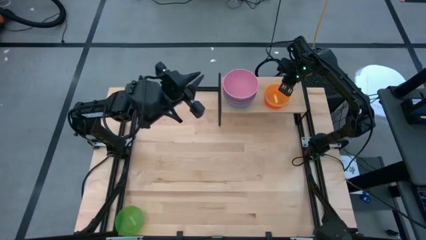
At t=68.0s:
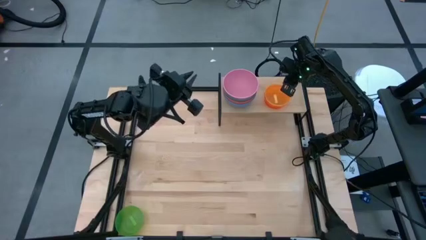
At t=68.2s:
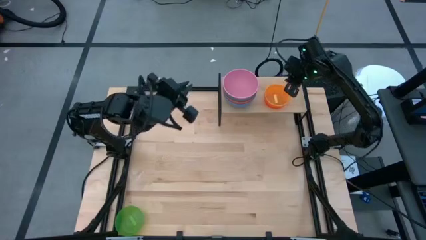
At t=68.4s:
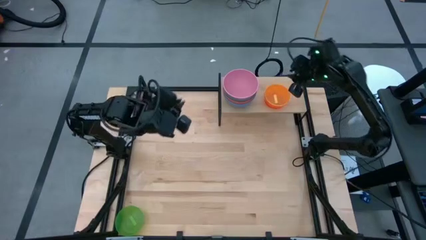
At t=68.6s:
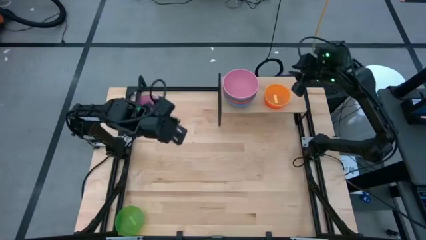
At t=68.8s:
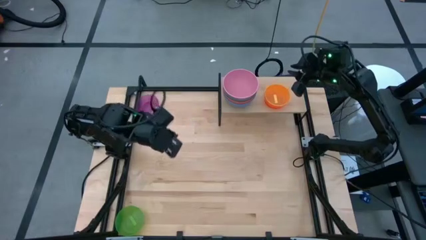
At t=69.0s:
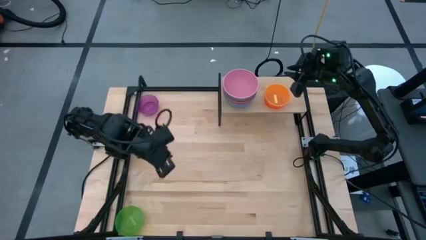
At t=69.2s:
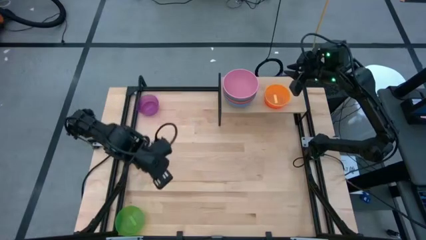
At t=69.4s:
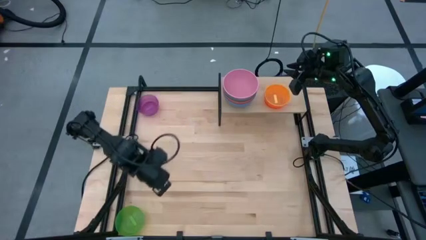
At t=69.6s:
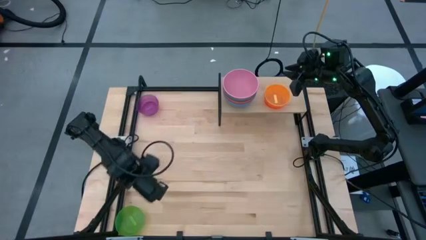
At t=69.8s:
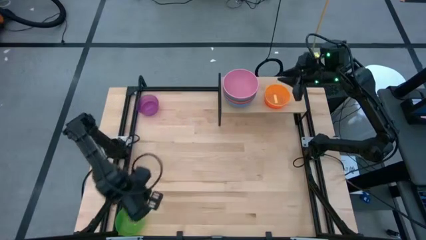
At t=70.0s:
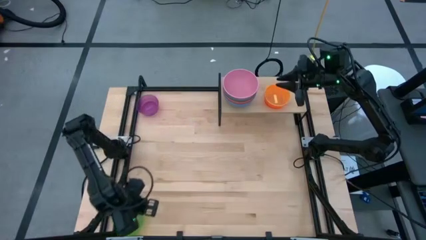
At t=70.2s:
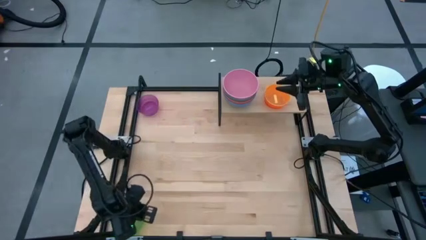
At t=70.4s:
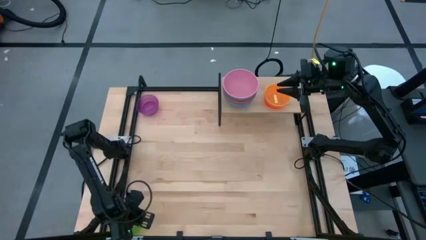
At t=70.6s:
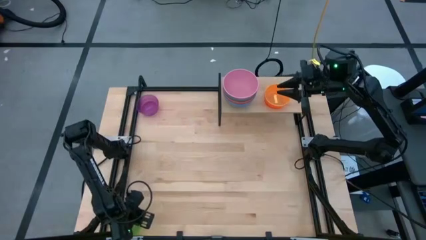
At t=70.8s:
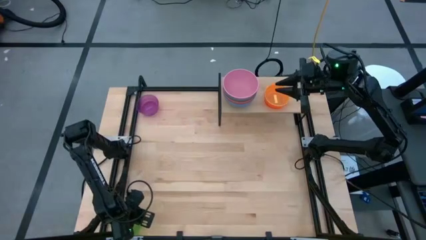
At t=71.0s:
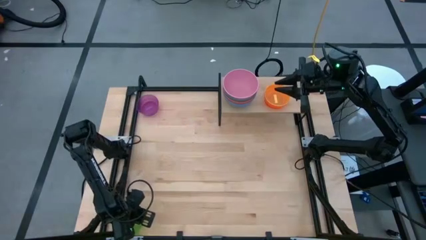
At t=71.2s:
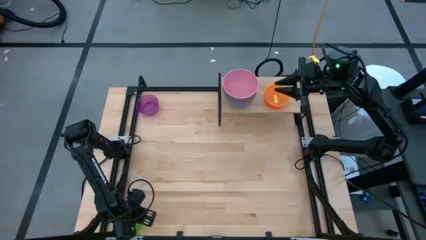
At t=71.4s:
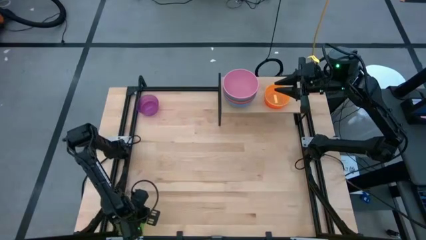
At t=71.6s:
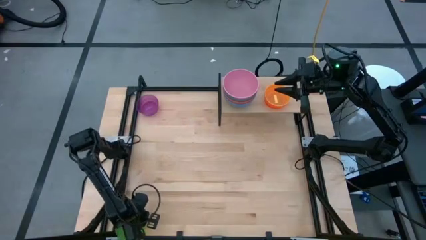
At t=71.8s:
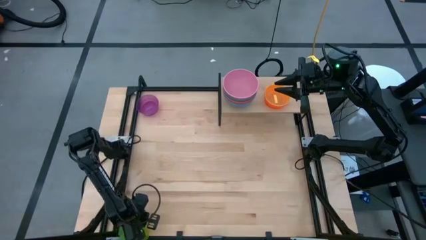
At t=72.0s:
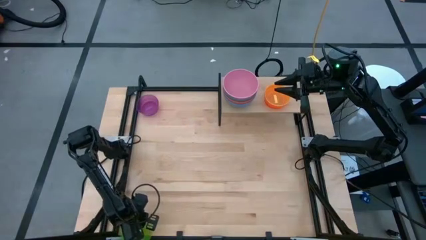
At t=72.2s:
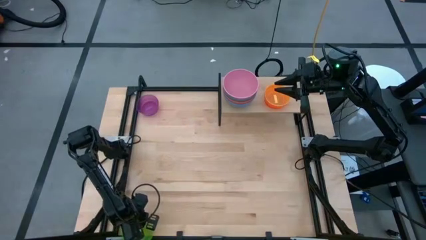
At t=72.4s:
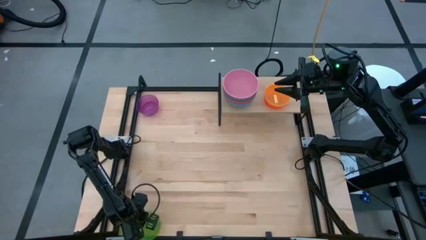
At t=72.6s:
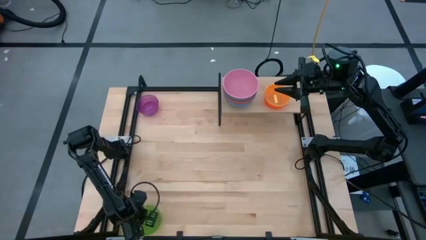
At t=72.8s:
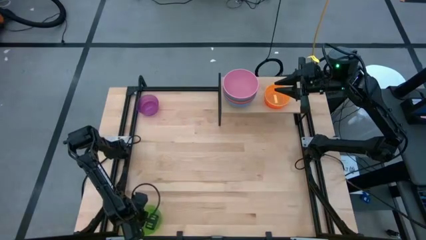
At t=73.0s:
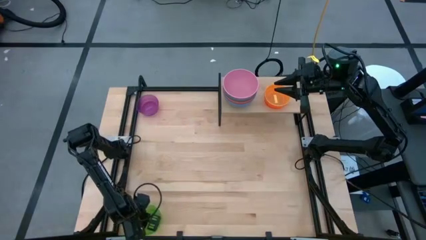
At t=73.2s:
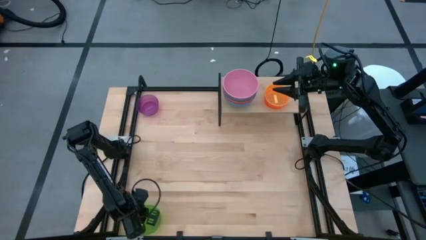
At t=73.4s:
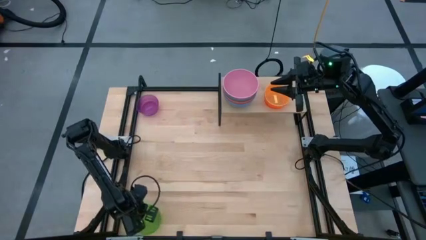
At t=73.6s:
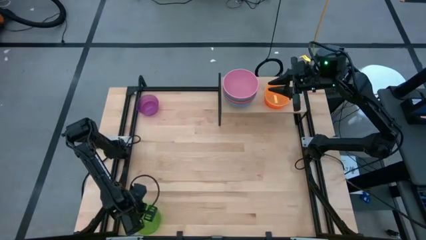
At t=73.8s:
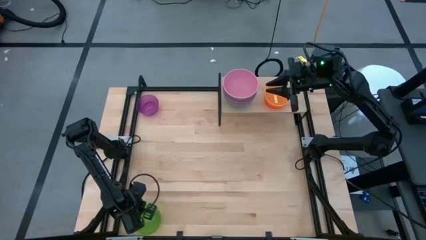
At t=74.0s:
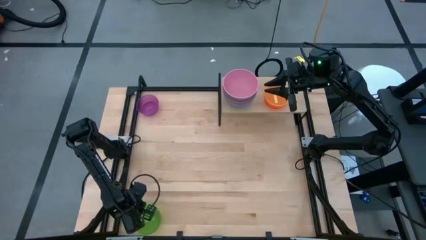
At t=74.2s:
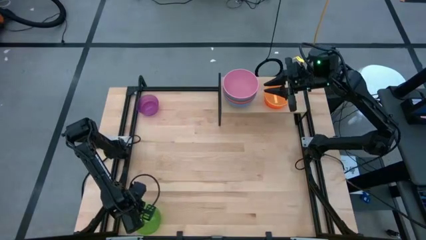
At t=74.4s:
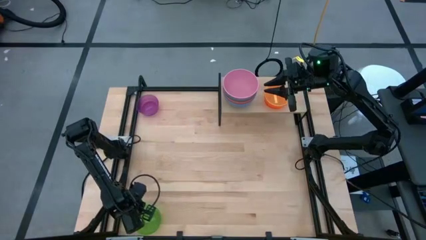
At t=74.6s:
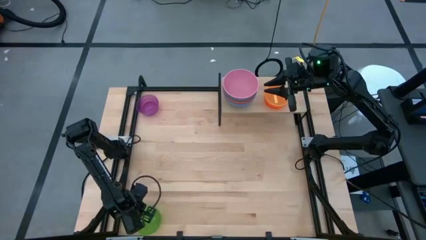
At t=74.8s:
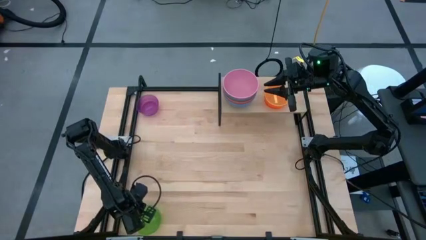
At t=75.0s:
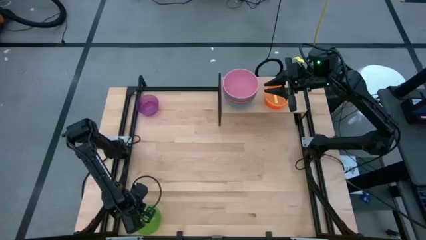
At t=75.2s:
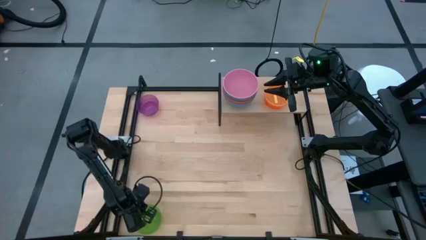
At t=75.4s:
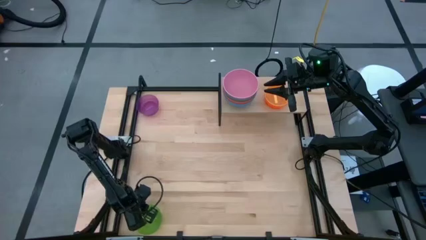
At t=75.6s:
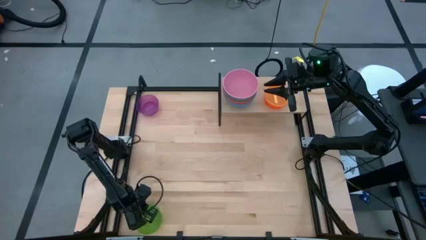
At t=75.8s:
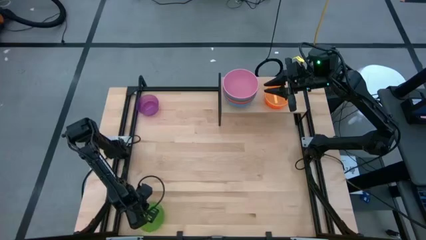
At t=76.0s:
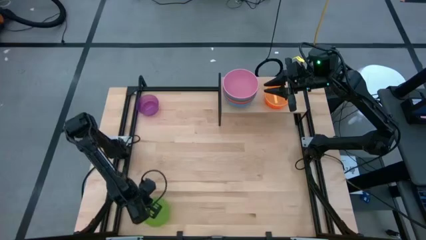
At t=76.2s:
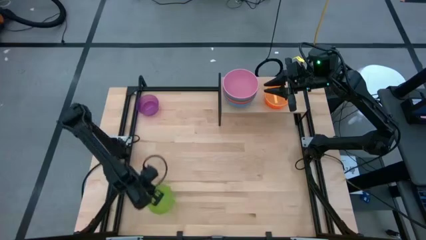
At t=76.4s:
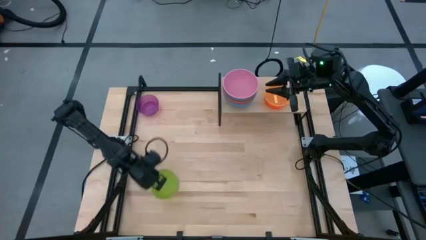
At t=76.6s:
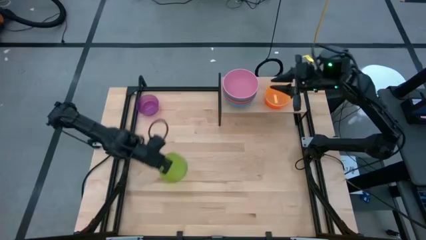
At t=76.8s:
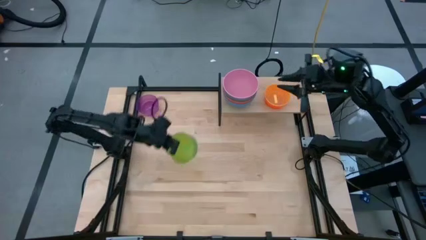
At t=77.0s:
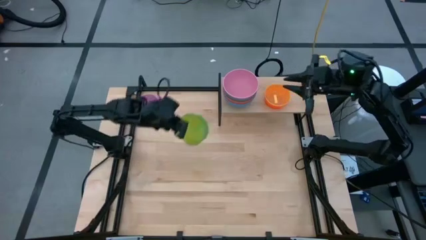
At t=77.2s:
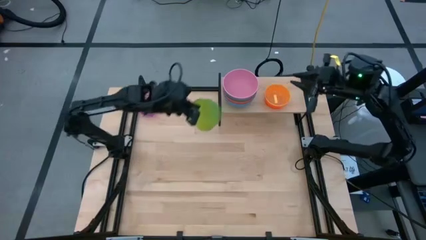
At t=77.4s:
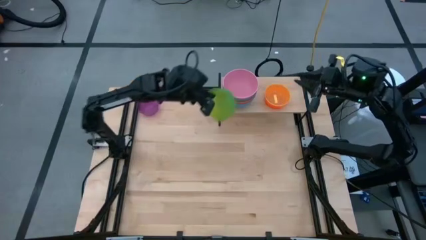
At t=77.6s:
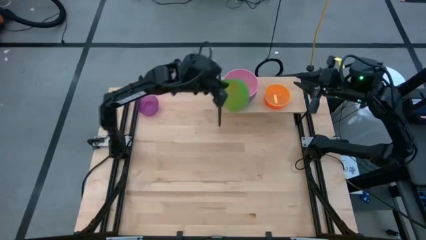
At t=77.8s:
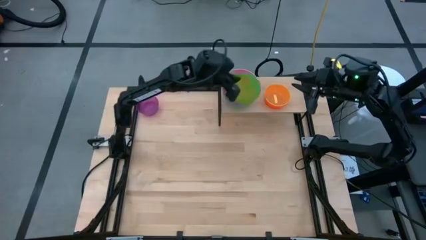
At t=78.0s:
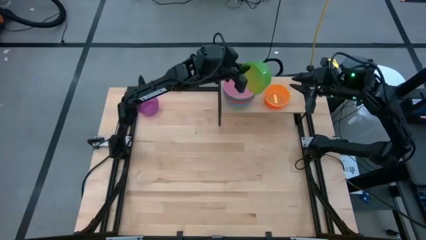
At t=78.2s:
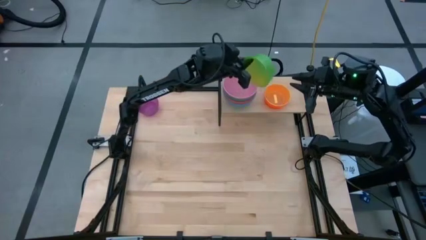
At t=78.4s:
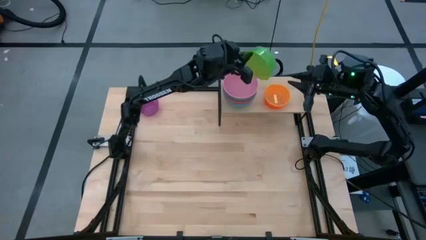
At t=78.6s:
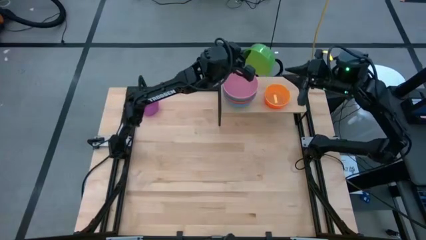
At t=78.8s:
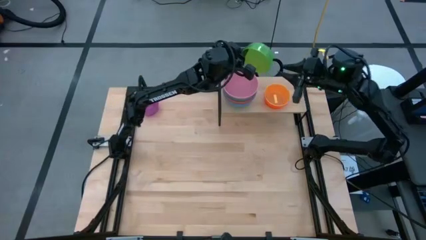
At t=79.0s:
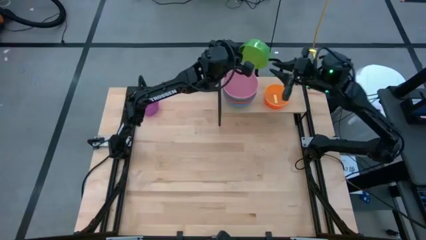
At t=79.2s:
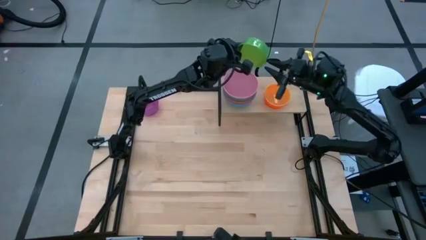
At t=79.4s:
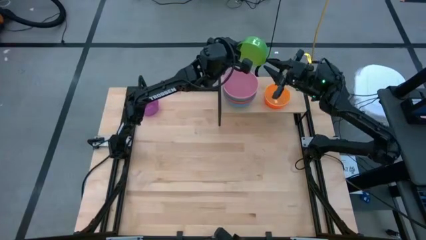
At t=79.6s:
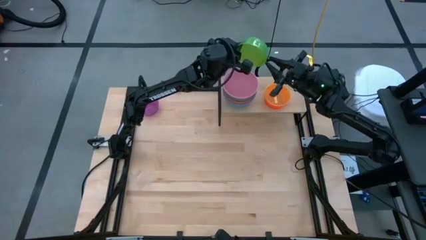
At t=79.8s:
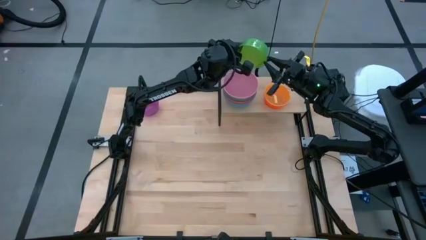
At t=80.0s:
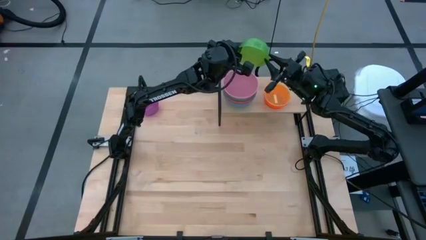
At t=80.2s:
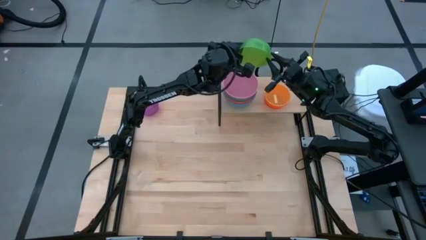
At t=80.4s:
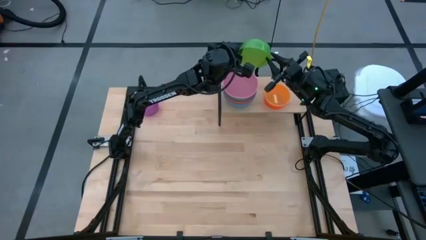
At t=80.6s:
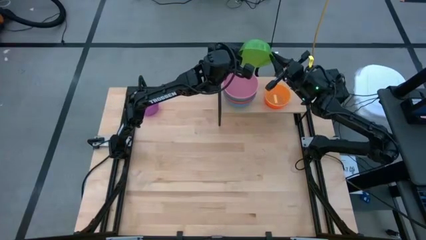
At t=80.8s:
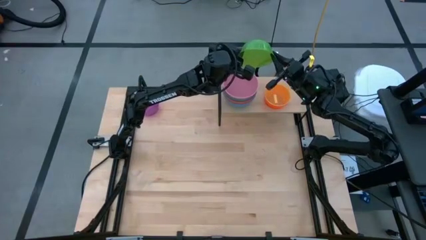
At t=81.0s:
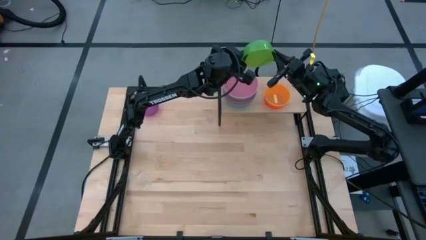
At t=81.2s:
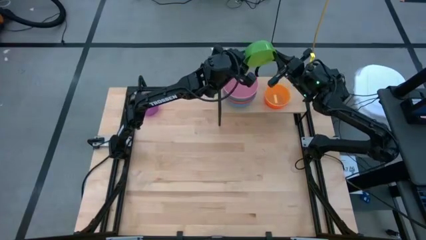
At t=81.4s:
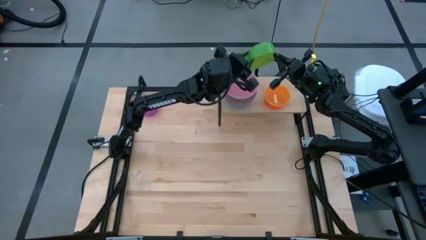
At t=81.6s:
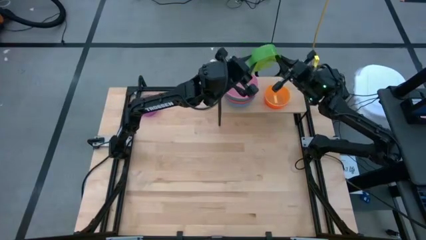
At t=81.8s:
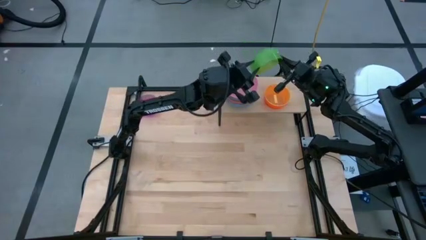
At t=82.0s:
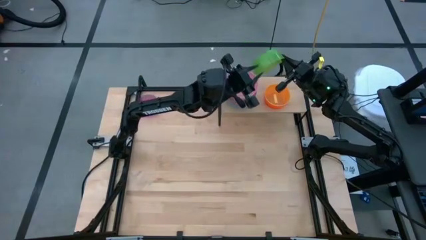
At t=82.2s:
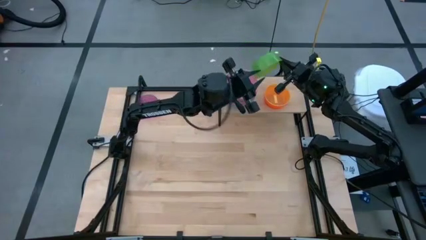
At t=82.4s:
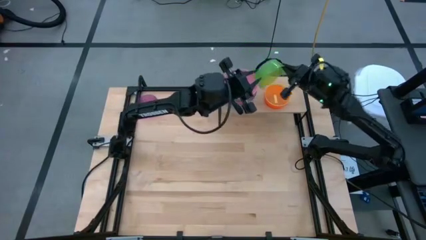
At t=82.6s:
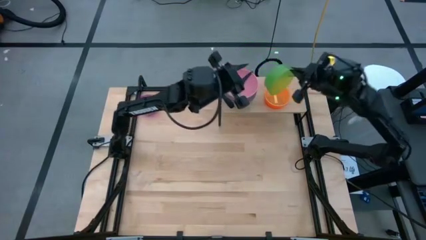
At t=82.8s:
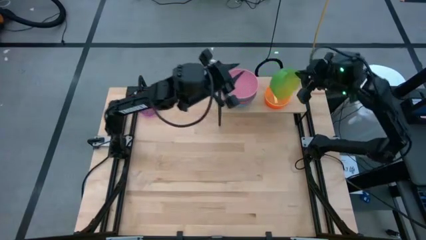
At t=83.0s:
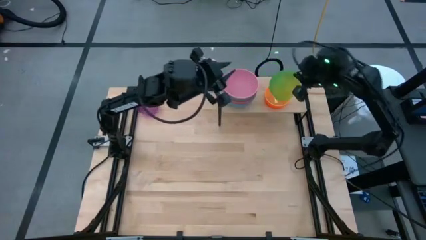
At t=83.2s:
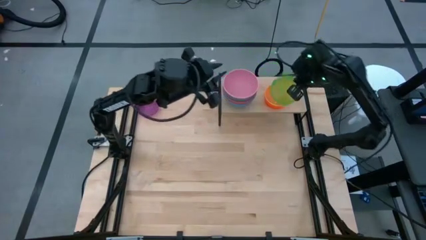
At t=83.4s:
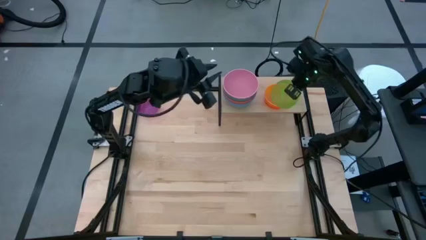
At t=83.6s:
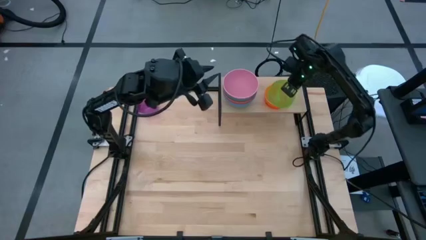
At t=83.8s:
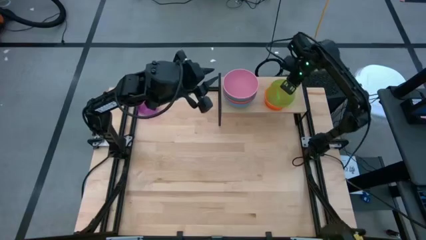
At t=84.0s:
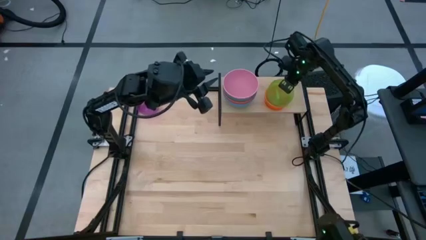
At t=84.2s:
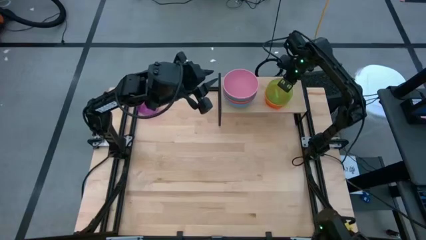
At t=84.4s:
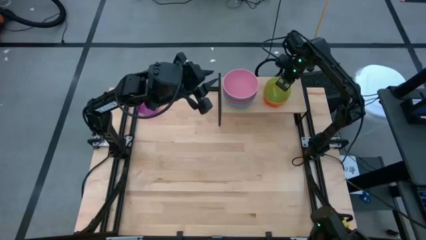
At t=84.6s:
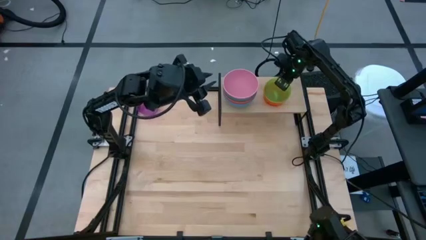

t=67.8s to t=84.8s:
Task: Place and stack bowls onto a shelf
Stack the green bowl on the shelf
